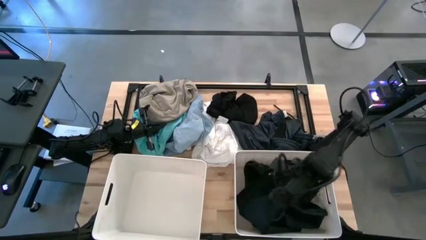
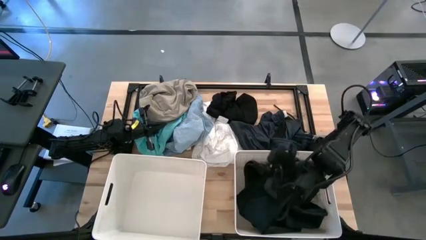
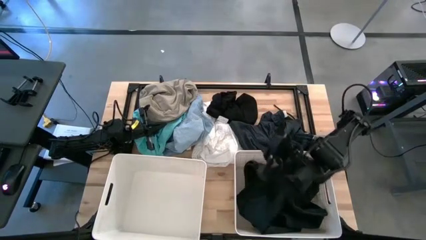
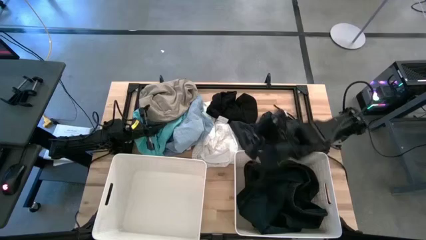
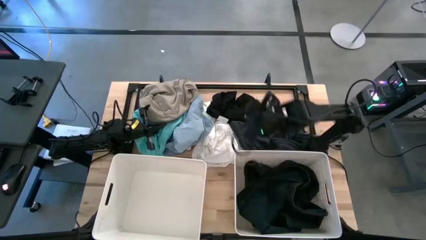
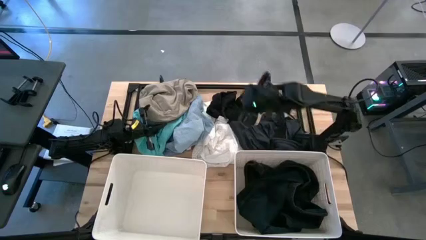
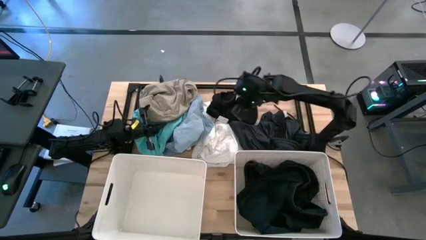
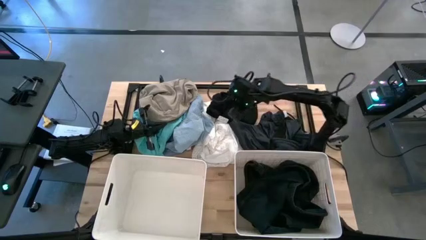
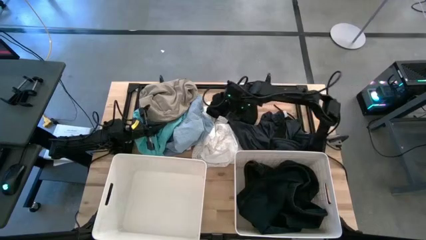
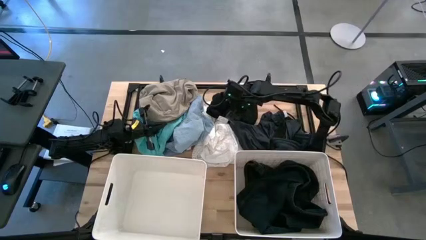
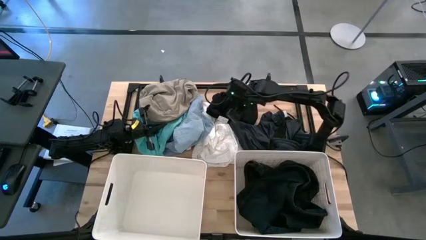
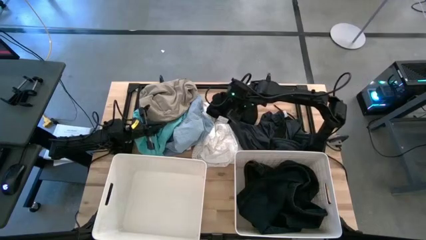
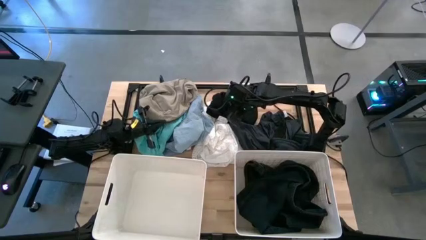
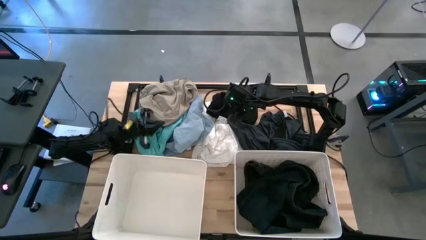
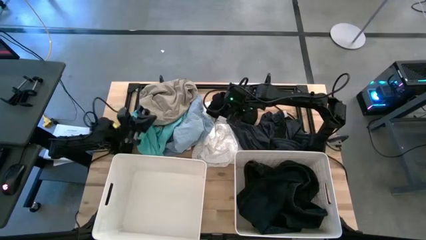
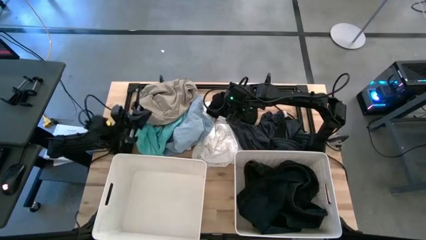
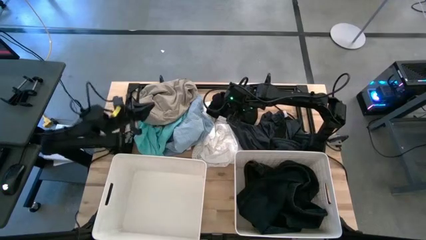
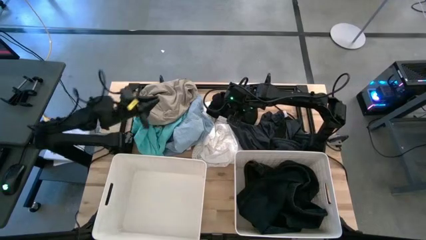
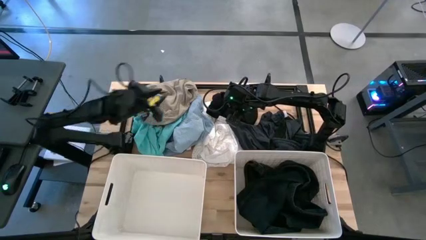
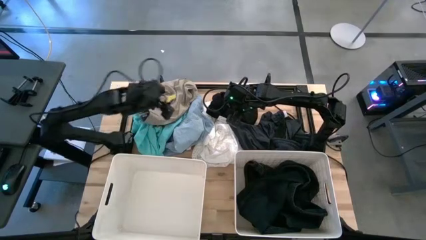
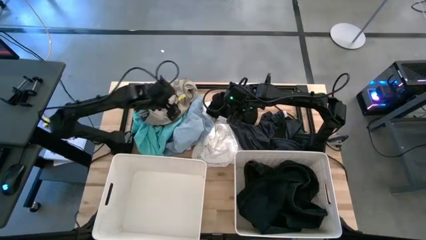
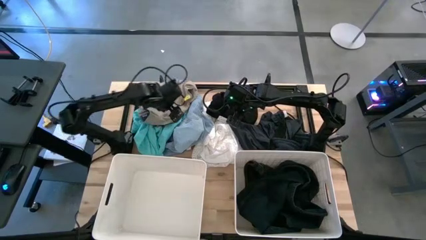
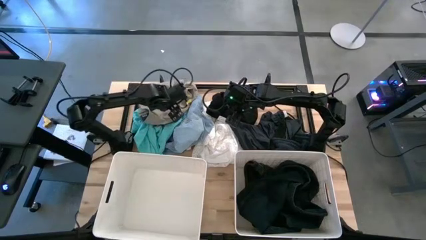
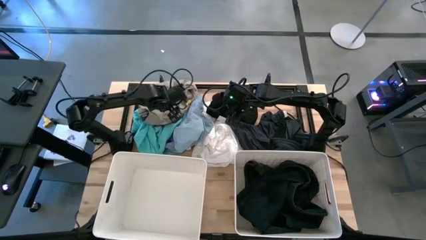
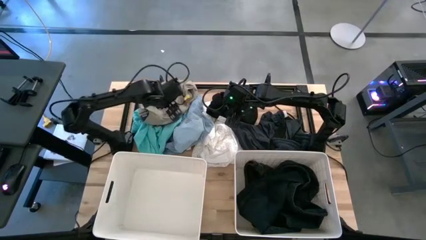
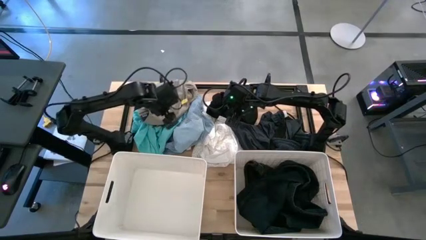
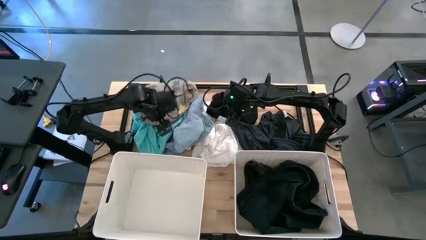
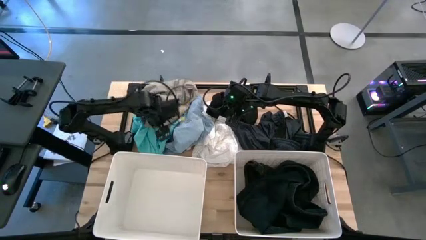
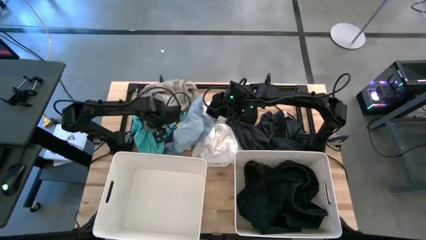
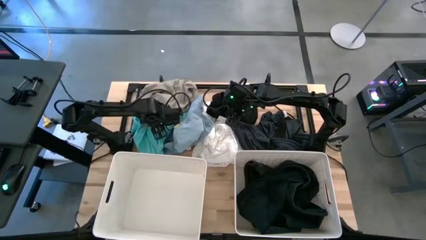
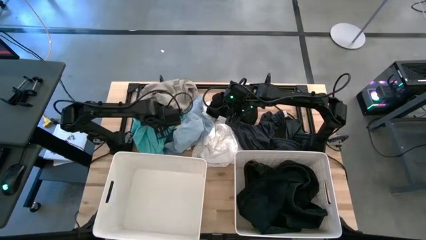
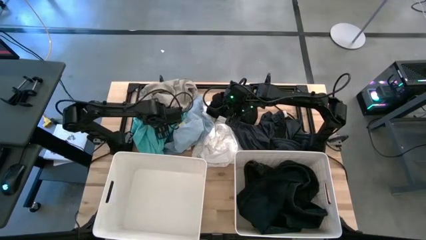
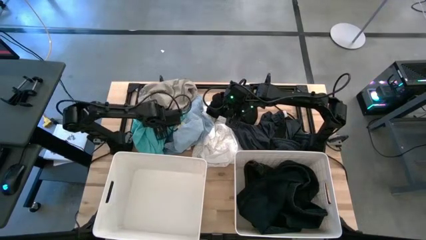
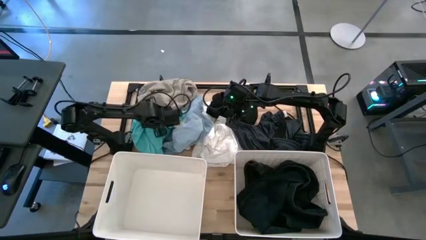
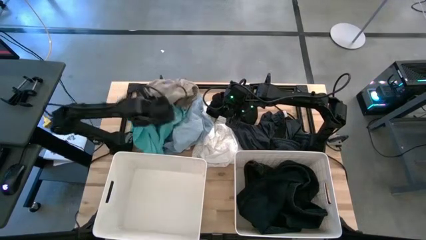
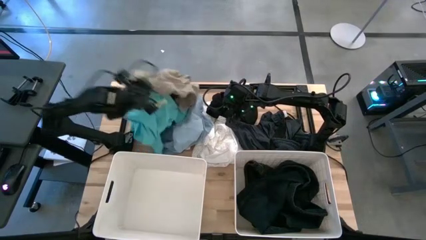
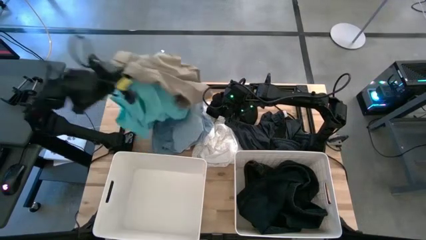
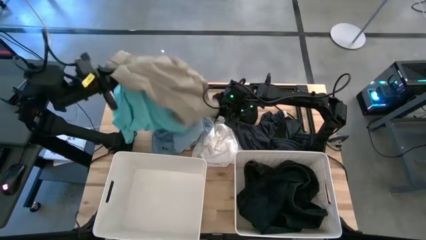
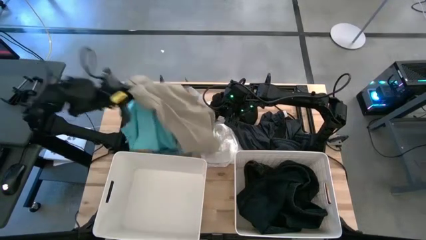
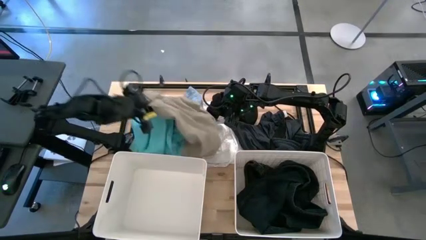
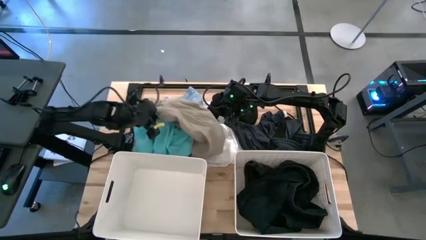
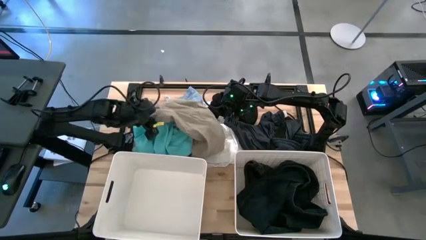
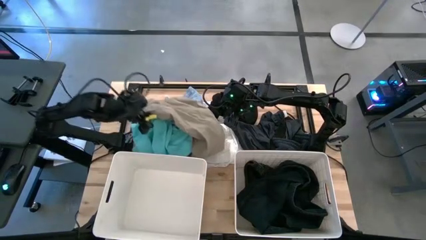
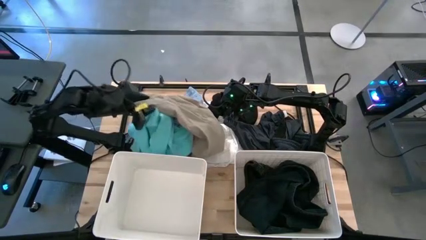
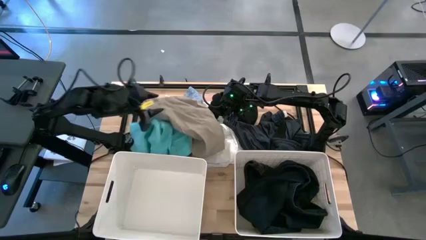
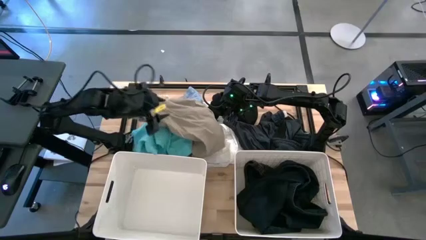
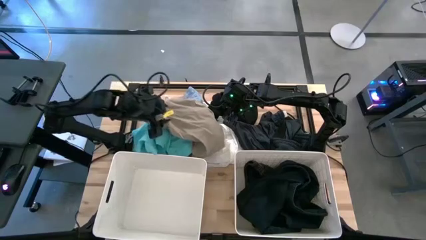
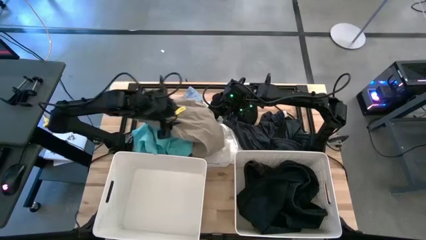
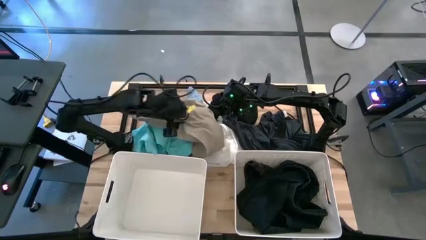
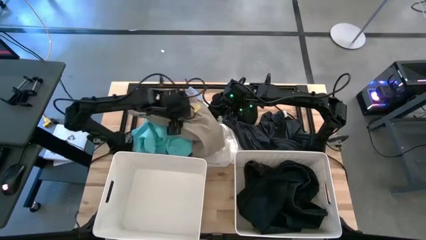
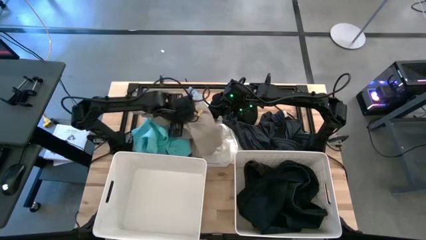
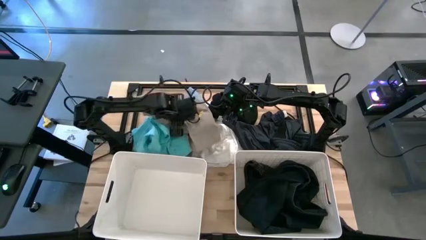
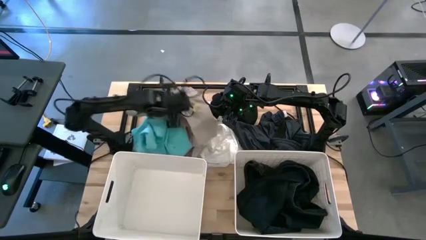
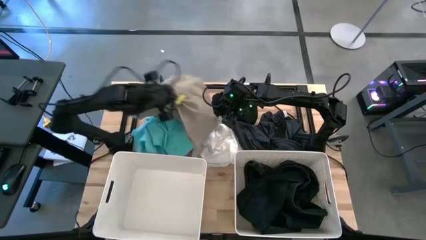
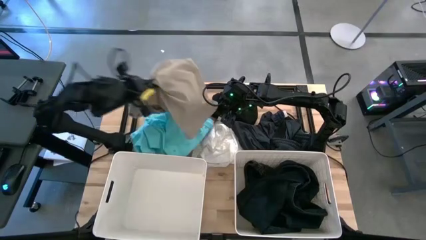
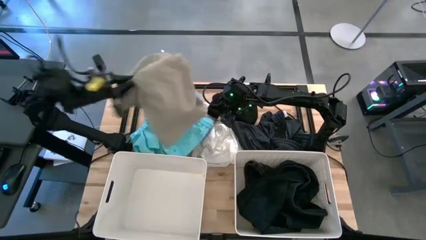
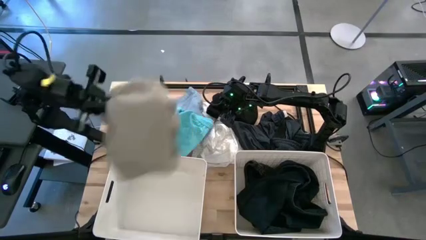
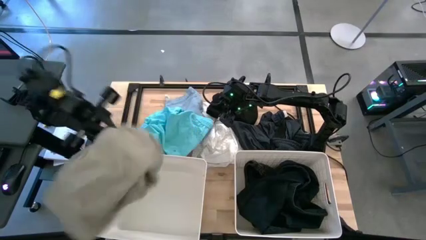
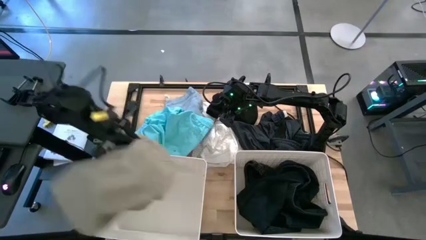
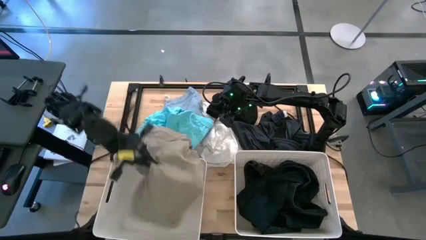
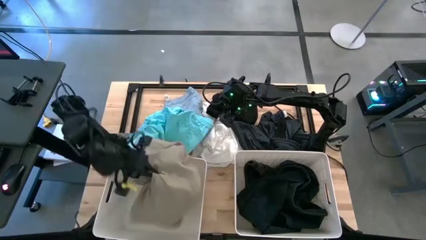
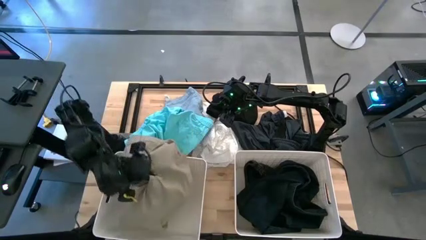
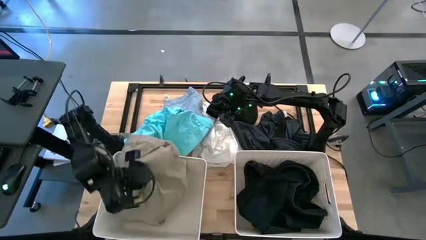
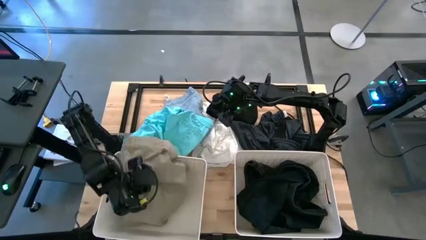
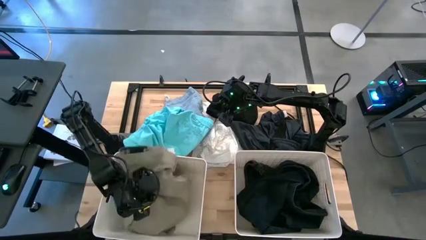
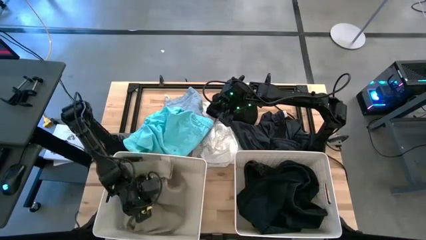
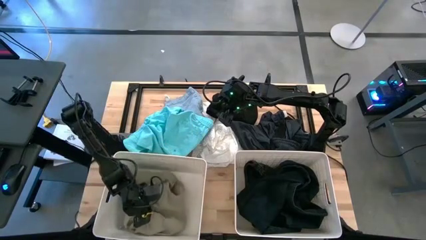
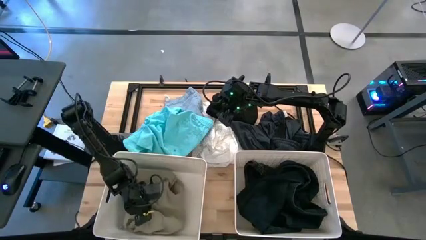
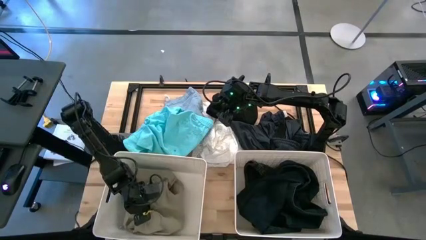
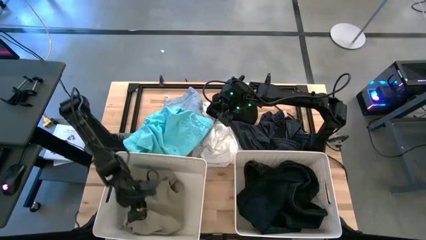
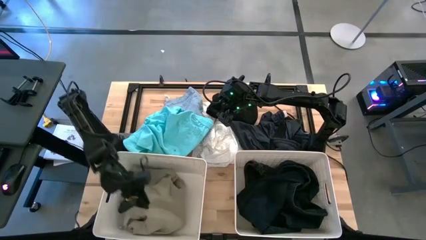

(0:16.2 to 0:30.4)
Task: Sort clothes
Put the brown pants into the left white laundry bin

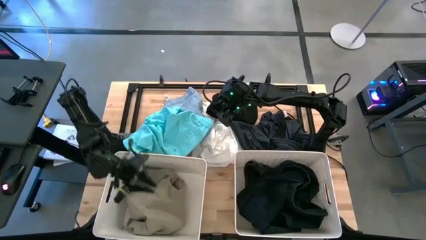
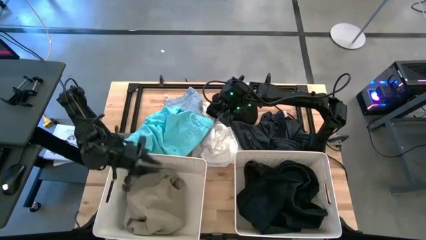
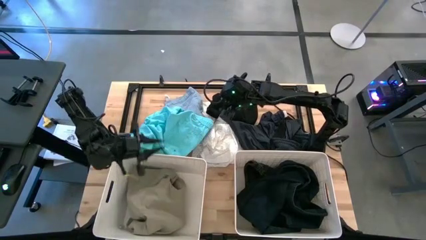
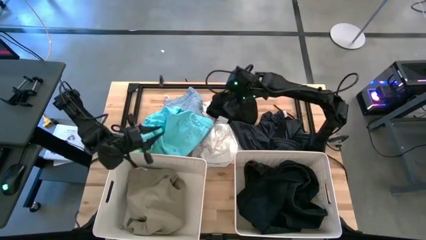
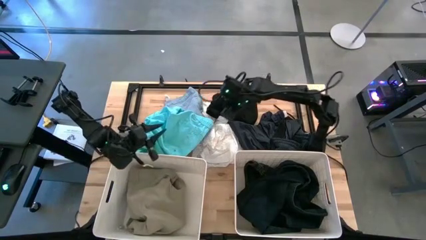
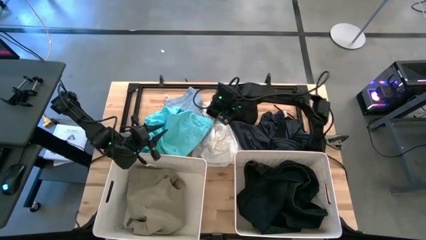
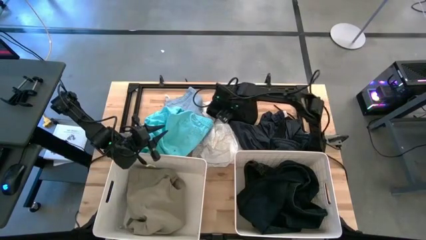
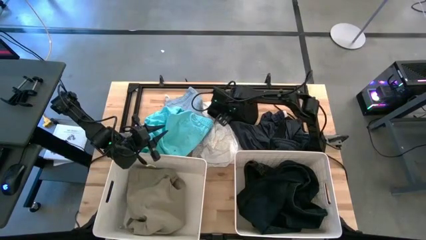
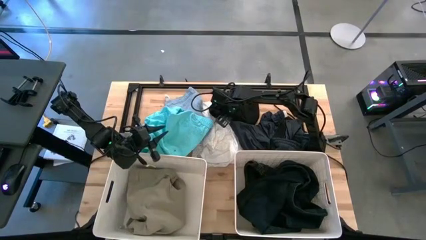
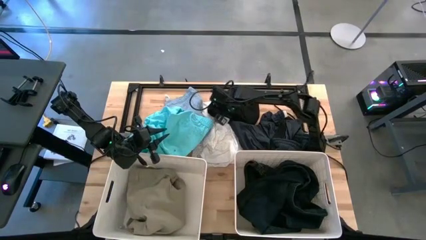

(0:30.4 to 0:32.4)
Put the black shirt into the right white laundry bin
